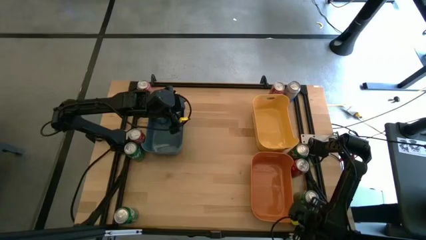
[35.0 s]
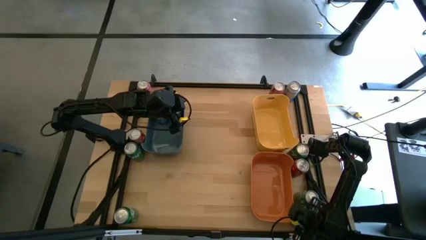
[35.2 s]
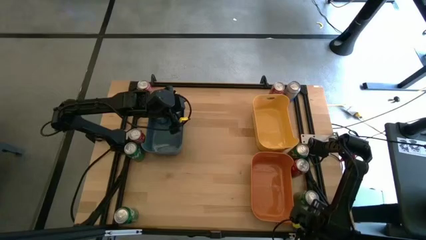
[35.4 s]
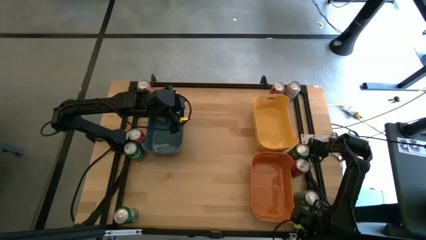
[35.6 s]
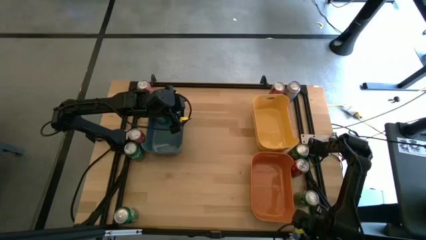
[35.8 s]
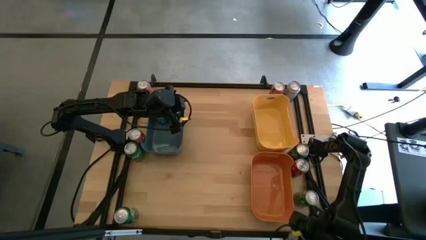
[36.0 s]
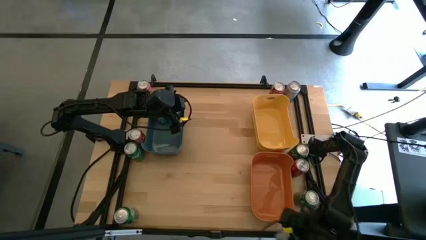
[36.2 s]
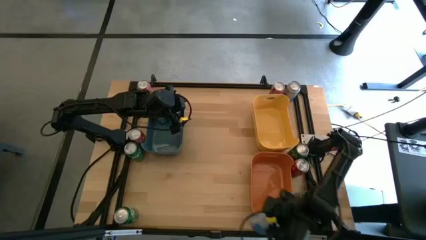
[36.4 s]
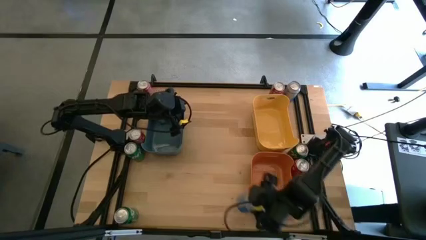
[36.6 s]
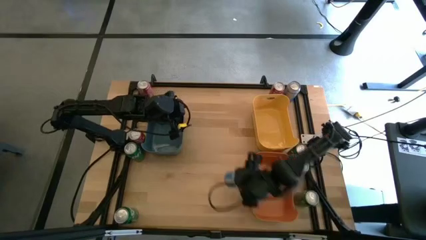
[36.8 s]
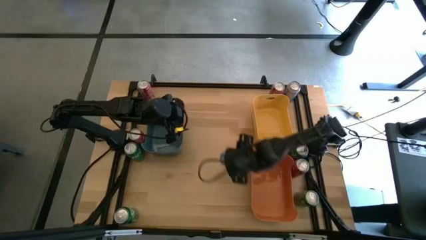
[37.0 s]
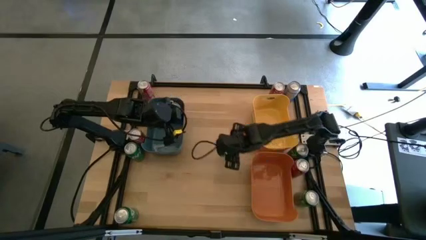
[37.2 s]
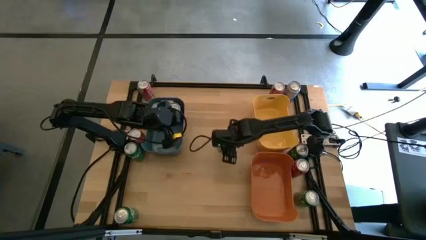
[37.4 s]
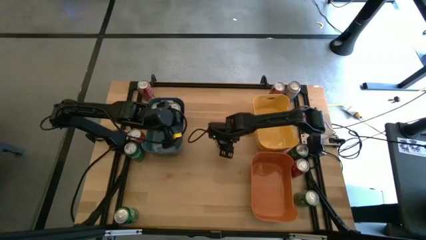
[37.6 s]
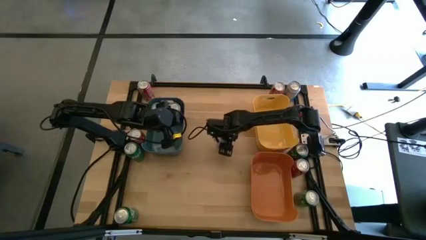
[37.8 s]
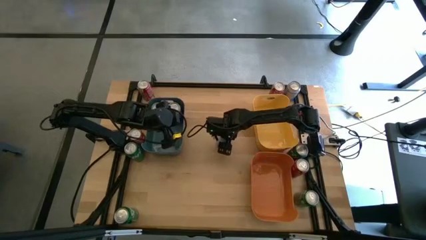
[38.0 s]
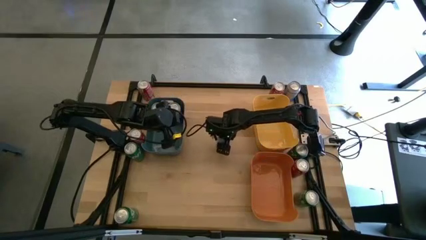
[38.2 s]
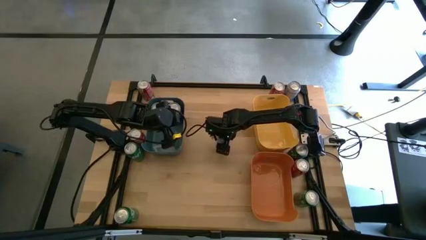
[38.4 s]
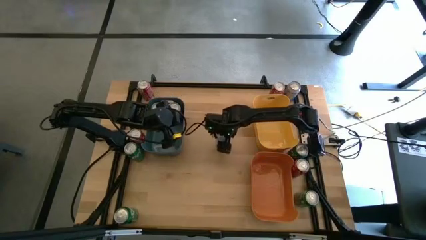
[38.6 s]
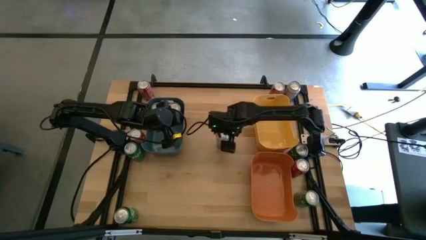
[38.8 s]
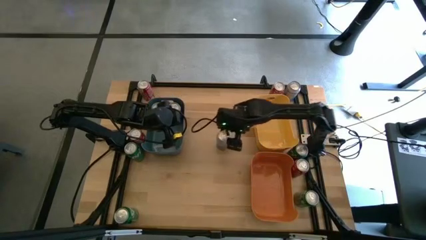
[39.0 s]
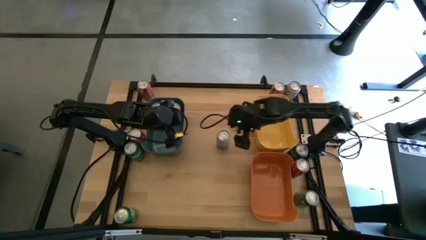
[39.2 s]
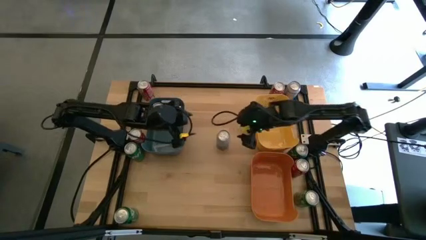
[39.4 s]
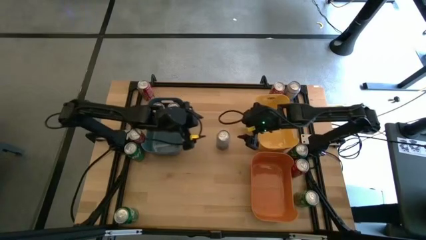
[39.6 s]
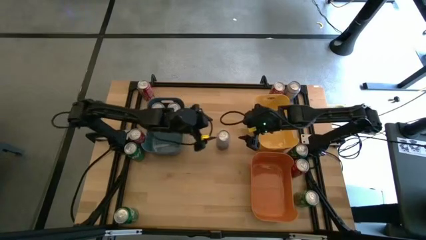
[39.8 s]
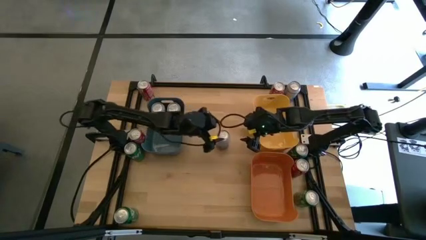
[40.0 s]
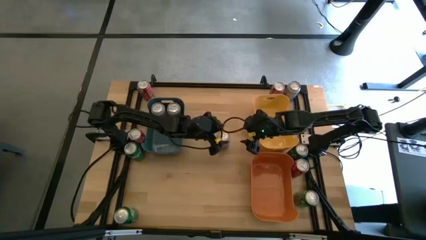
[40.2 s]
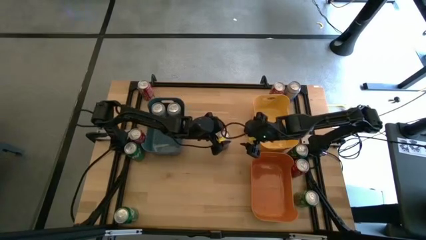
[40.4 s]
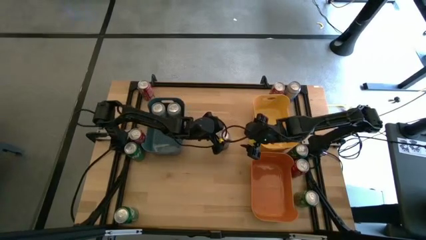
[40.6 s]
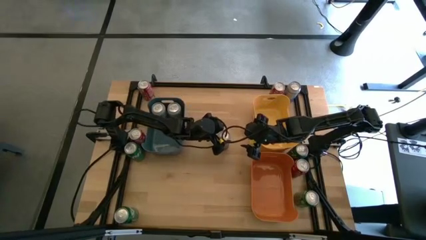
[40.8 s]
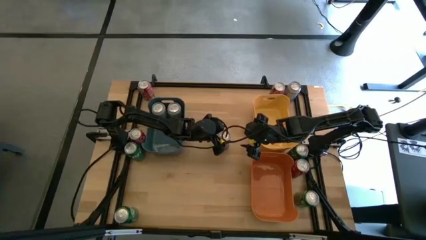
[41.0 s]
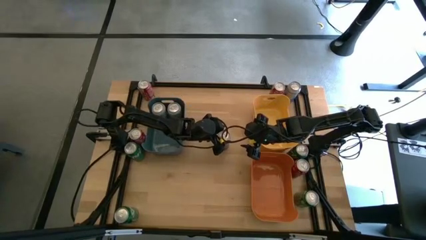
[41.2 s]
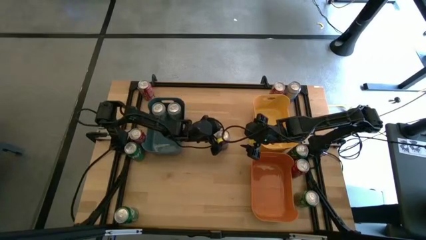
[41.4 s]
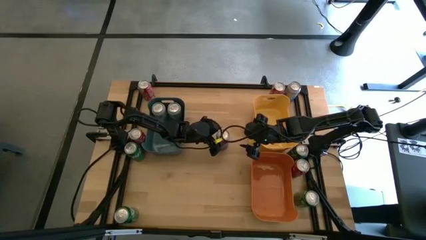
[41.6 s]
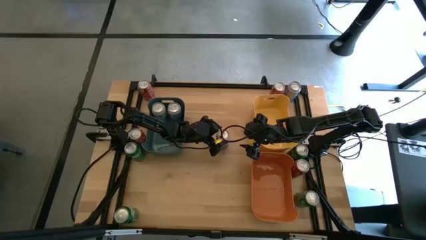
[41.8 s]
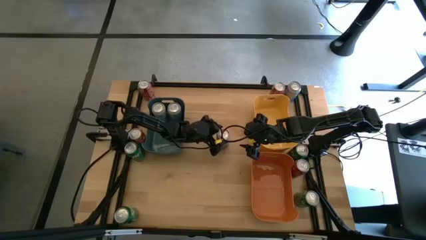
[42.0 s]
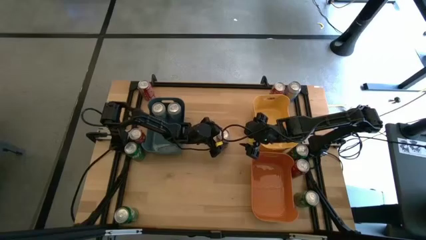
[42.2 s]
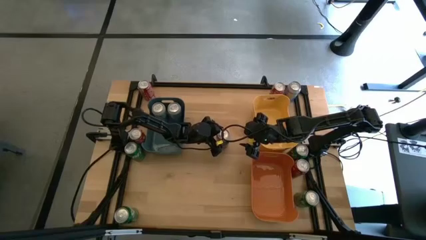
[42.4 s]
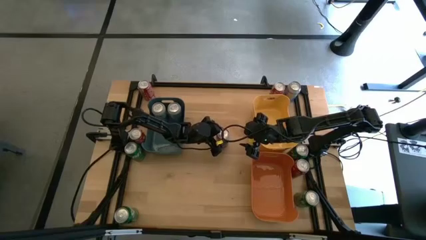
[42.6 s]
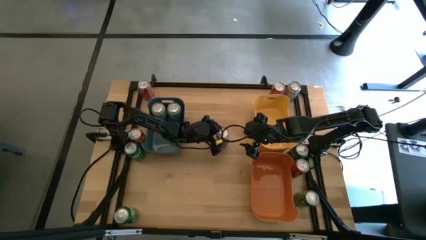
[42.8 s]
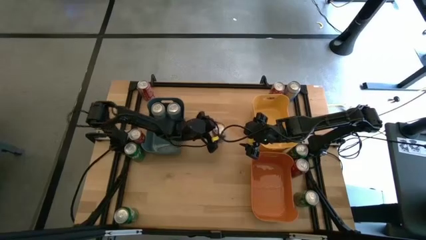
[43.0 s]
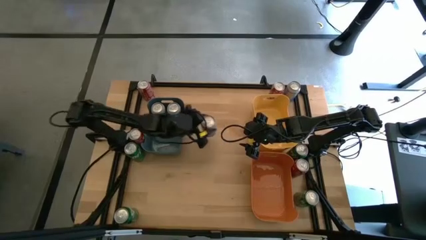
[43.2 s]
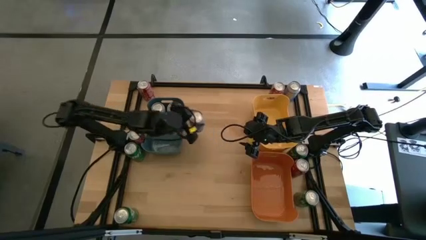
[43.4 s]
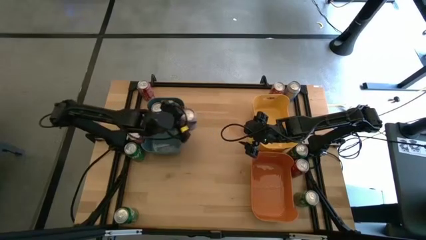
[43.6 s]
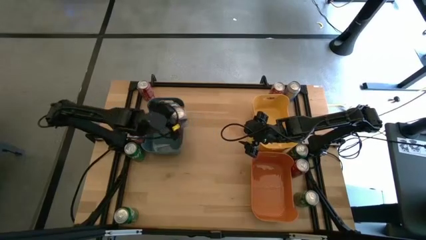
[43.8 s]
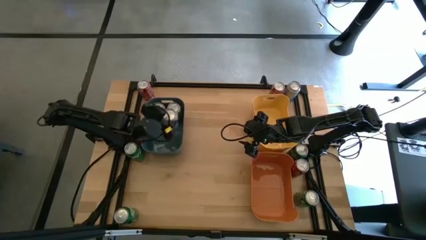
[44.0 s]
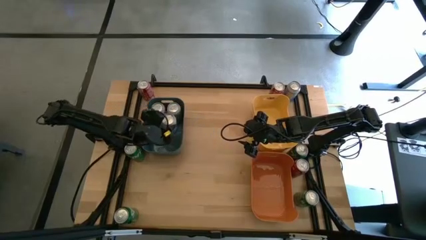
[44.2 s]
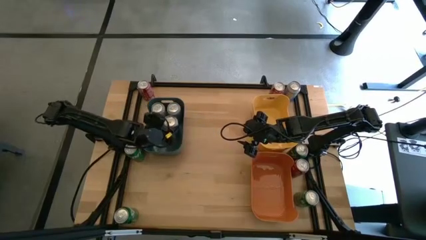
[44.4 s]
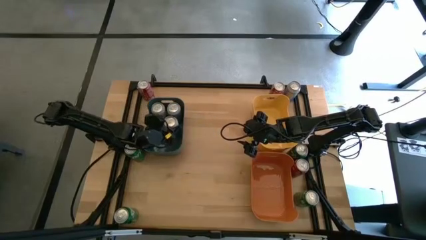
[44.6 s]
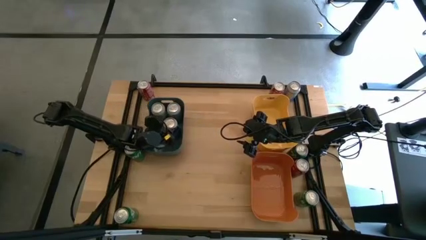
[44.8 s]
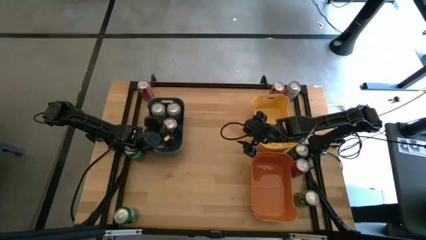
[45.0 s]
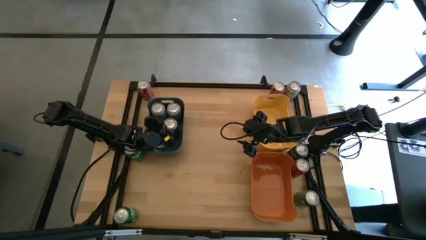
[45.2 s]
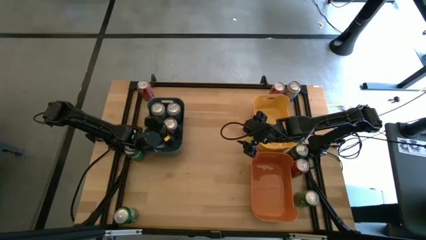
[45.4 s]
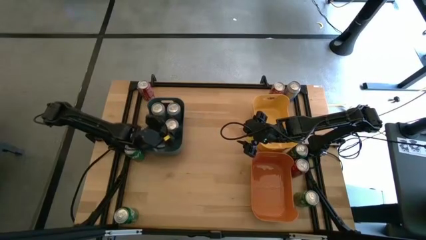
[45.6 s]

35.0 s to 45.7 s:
Task: Sort soda cans
Put the bottom blue-white soda can into the blue bin

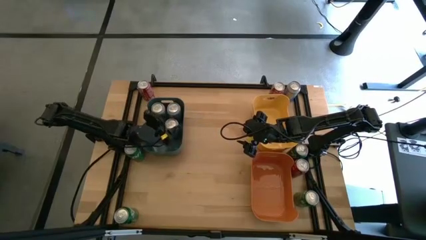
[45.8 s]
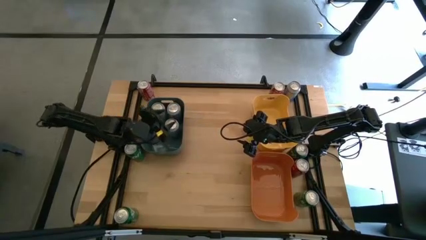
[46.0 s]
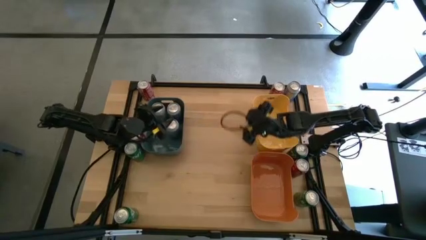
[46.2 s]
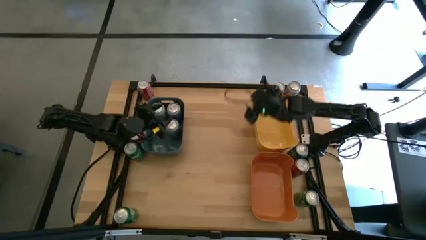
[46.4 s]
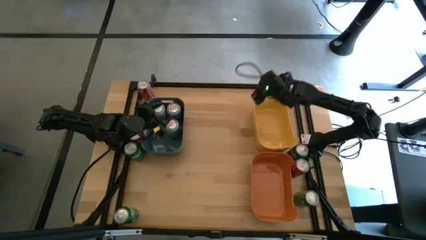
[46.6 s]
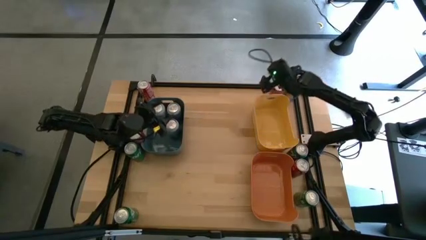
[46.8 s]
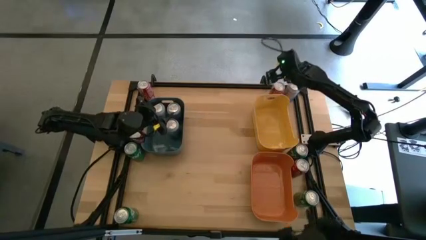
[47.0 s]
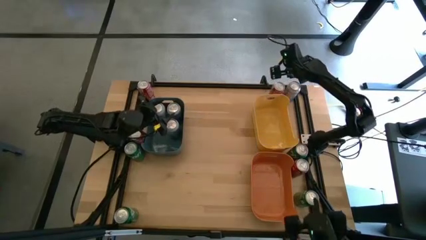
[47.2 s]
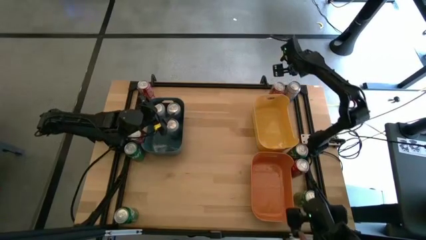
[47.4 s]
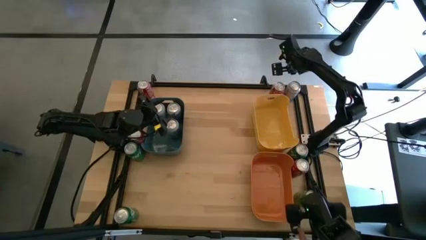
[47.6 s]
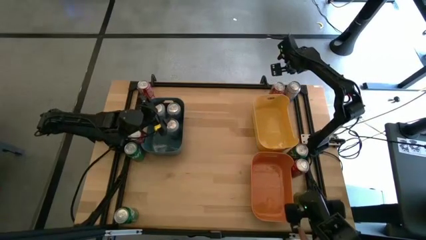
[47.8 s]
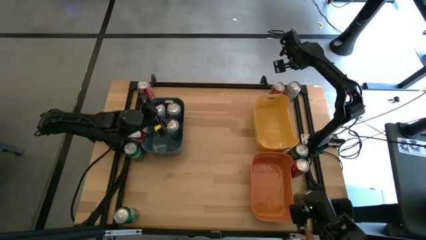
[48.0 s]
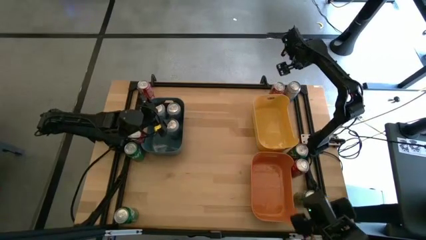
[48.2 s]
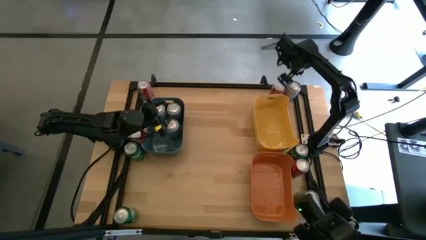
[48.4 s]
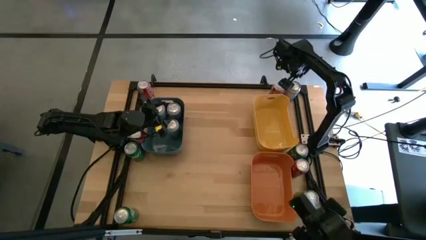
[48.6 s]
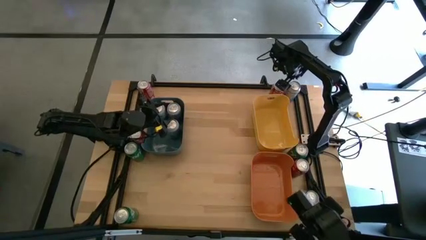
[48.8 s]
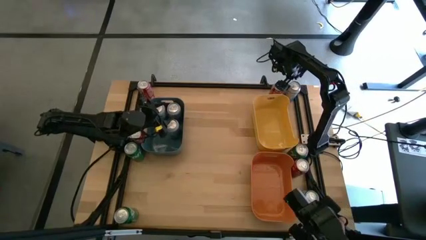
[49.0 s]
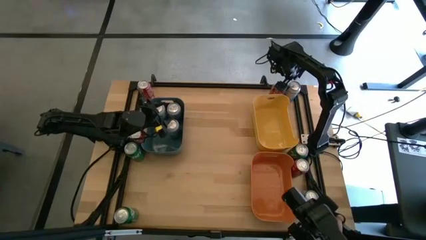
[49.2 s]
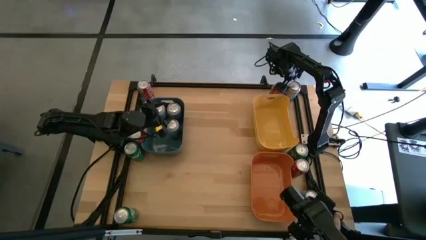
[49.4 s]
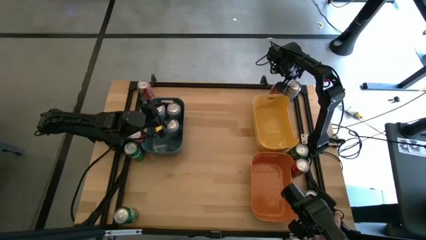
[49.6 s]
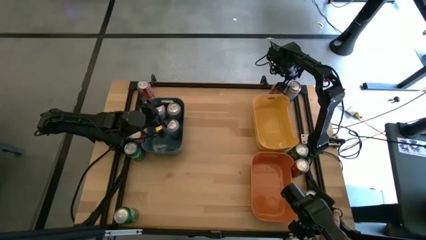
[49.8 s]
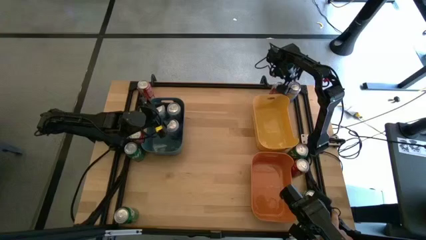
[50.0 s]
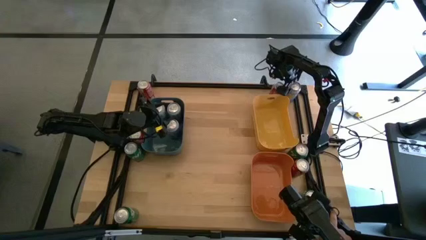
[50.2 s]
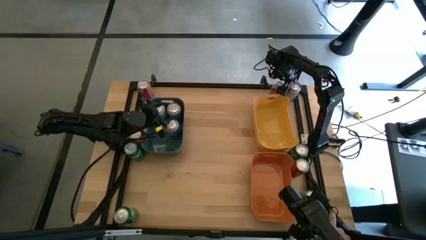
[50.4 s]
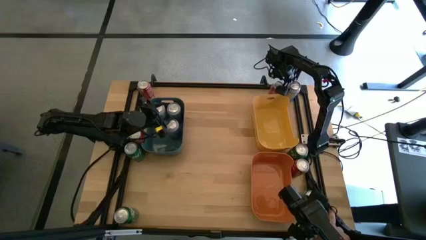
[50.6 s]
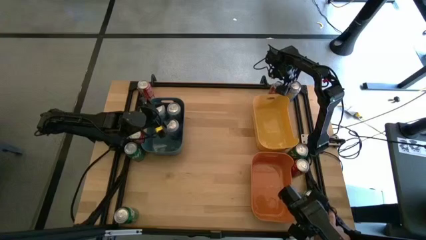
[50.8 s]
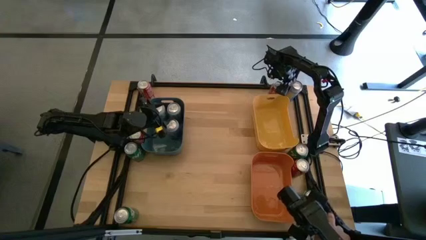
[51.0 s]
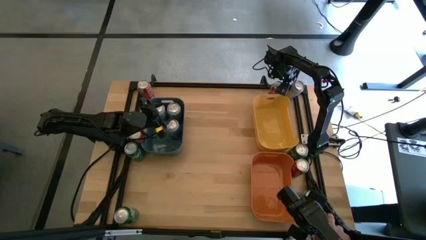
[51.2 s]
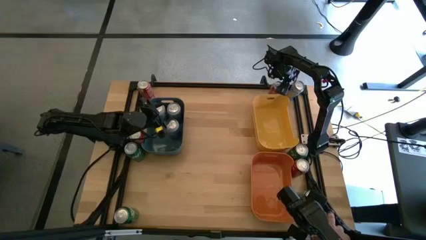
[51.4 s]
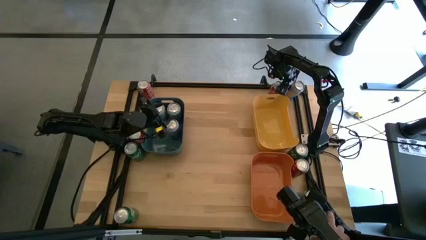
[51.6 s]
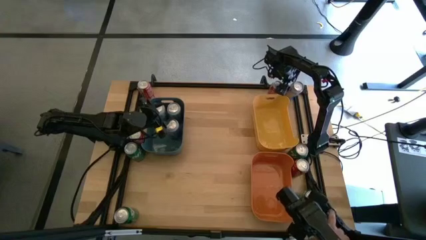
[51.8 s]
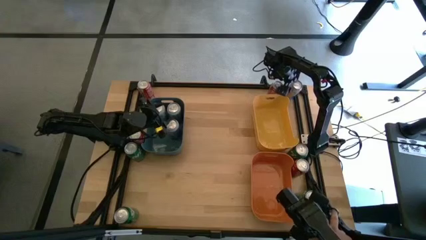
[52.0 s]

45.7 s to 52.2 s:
Put the blue-white soda can into the blue bin
